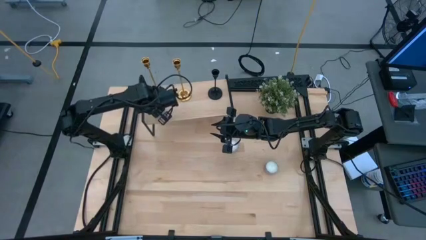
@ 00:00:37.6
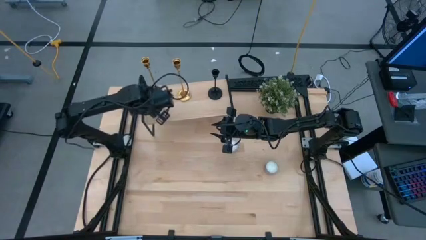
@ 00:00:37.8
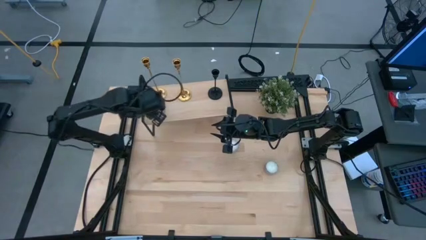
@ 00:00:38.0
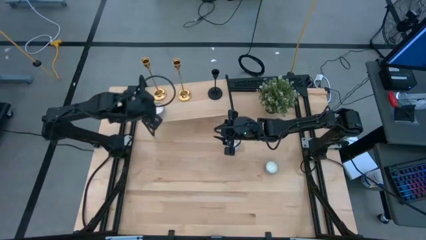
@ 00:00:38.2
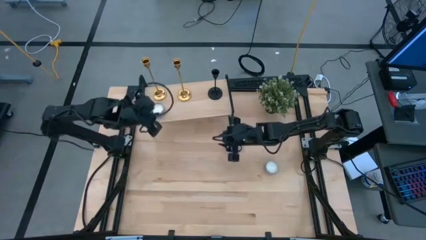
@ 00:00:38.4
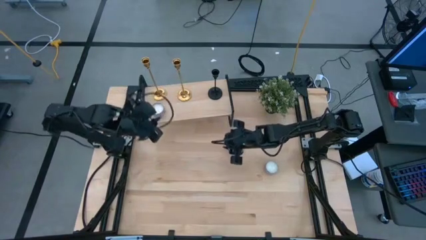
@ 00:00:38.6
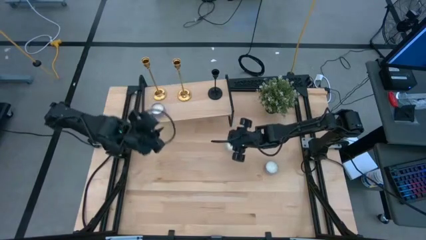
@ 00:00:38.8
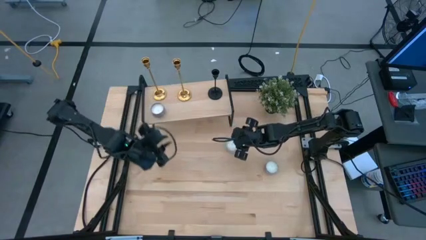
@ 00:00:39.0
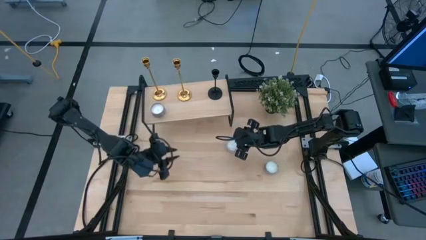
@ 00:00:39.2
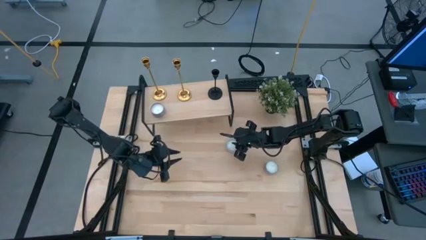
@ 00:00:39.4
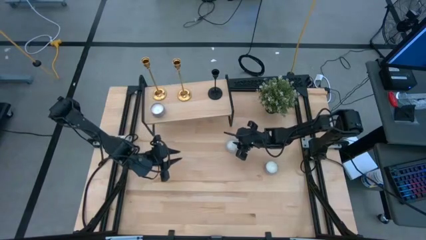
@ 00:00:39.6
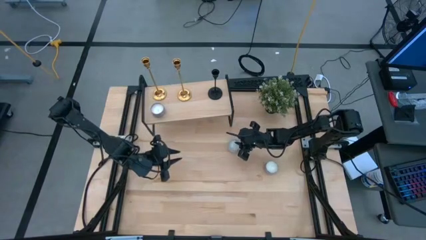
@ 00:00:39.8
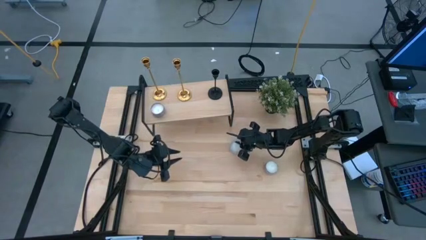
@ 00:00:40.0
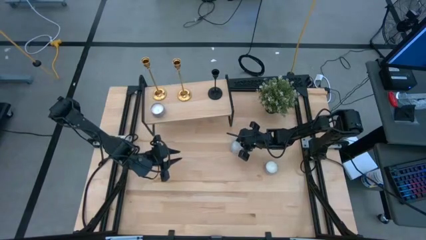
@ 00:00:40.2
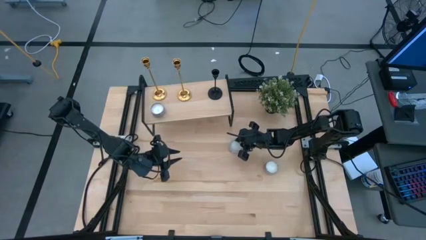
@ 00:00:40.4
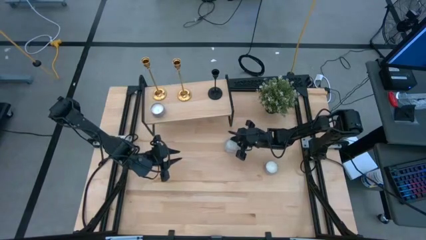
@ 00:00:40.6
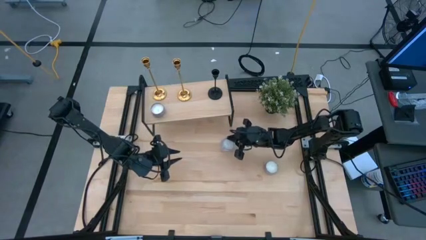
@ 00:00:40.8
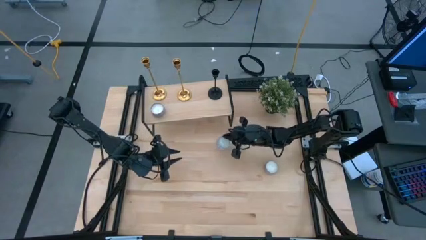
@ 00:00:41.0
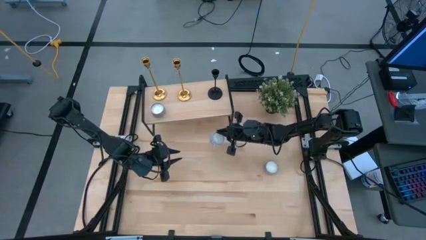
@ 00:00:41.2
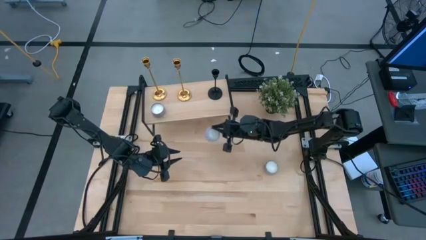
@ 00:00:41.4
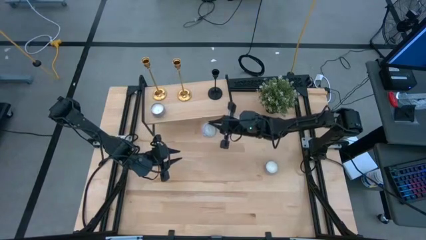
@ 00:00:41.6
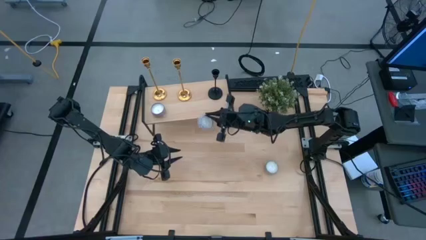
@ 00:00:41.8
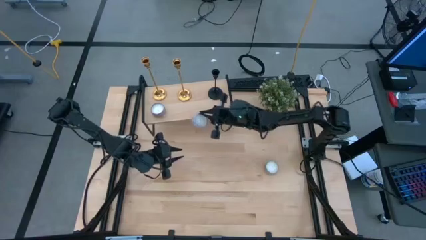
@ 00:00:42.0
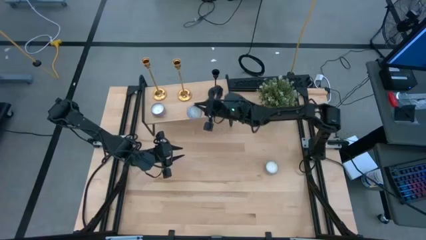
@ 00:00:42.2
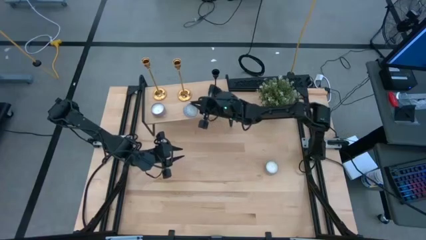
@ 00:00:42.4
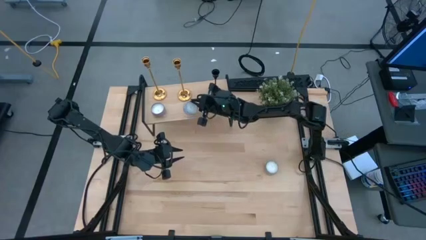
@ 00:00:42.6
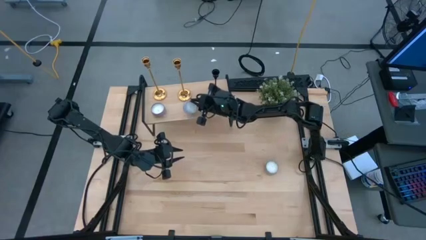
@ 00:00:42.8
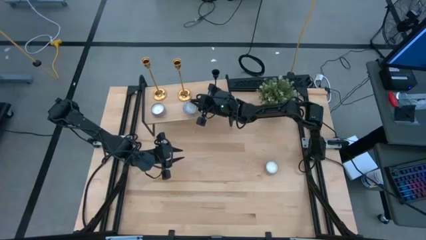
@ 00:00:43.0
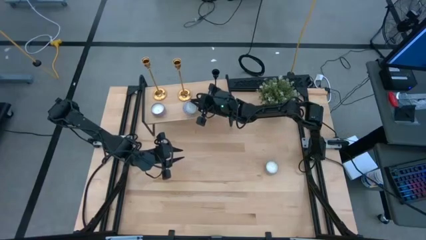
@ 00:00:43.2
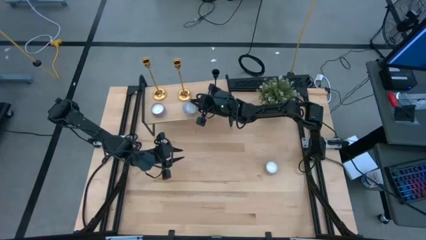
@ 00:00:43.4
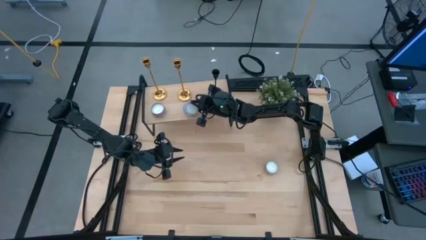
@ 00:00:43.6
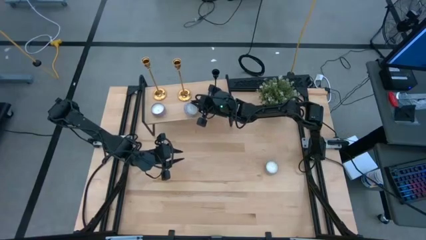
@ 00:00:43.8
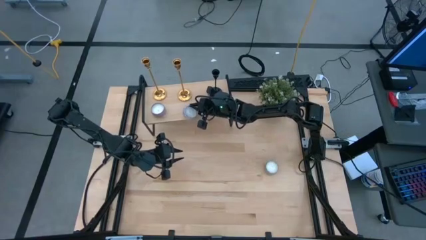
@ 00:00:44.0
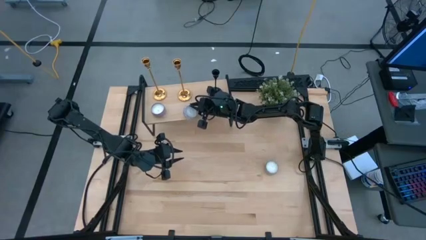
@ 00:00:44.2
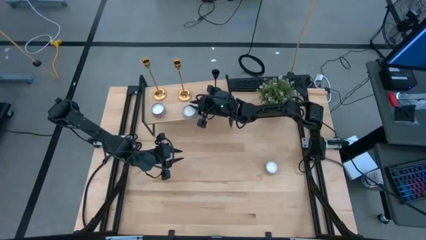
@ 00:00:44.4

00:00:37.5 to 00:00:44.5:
Task: Pick & Place candle stick holders
Put the blue and white scented candle on the shelf

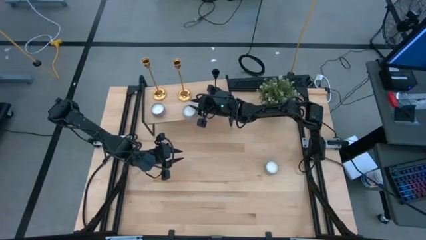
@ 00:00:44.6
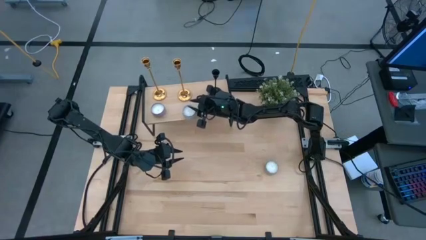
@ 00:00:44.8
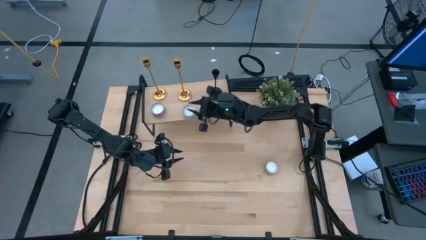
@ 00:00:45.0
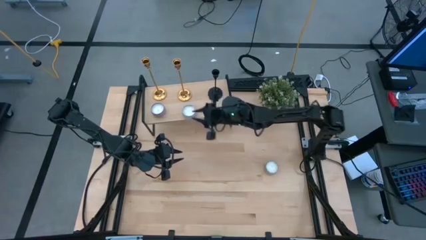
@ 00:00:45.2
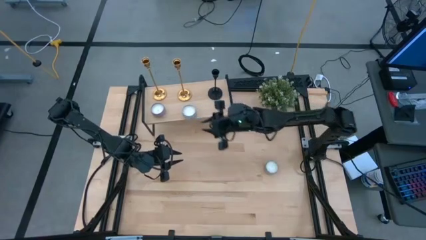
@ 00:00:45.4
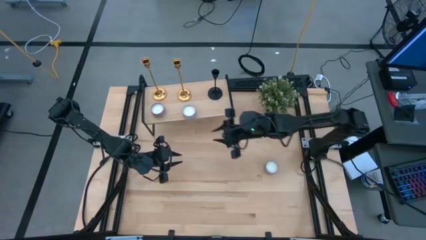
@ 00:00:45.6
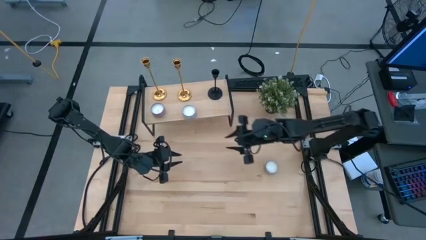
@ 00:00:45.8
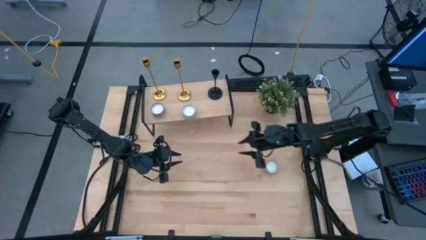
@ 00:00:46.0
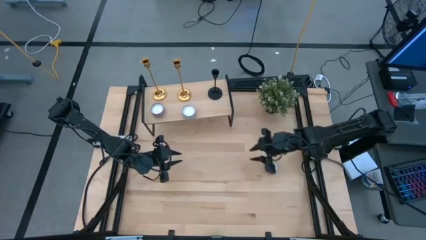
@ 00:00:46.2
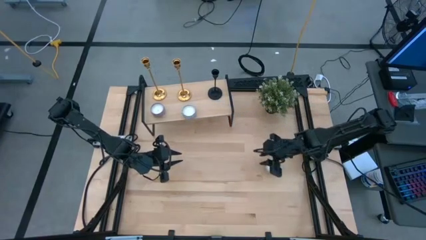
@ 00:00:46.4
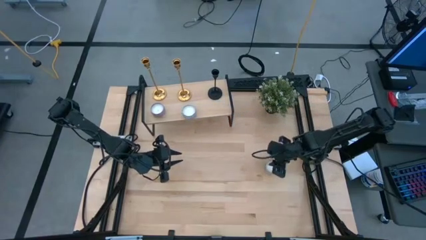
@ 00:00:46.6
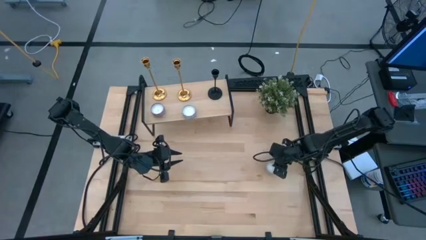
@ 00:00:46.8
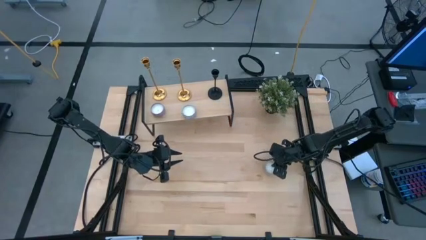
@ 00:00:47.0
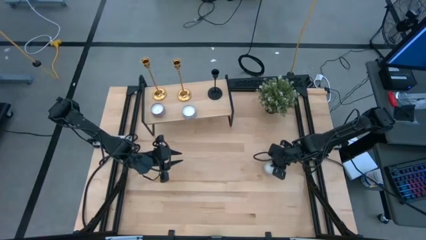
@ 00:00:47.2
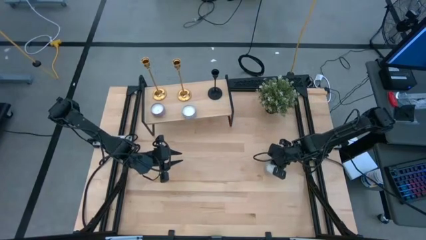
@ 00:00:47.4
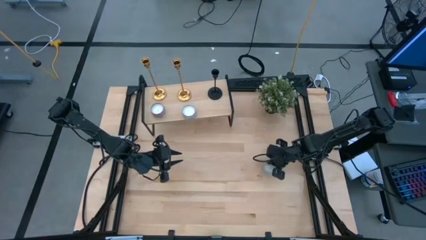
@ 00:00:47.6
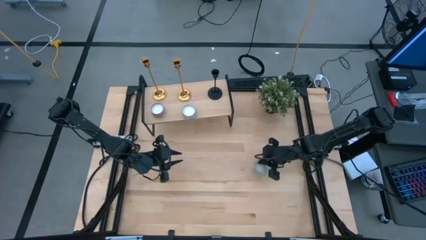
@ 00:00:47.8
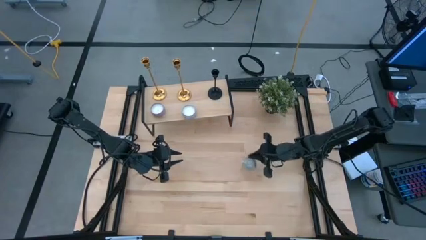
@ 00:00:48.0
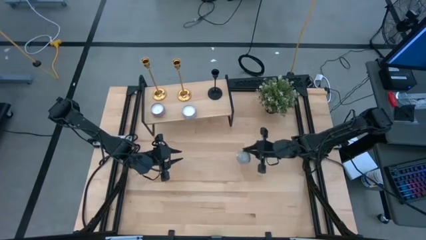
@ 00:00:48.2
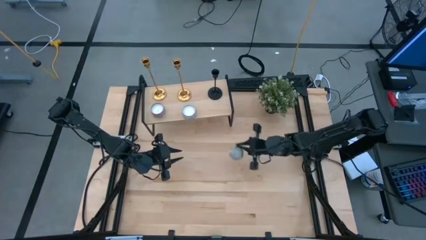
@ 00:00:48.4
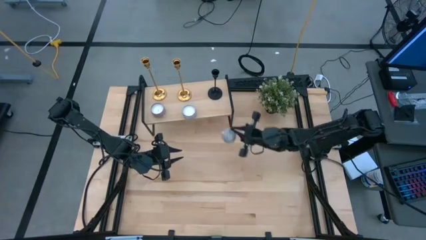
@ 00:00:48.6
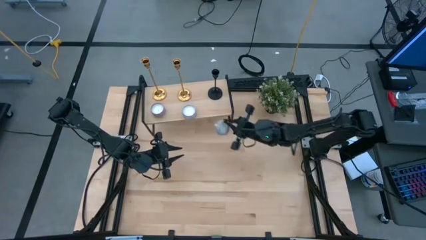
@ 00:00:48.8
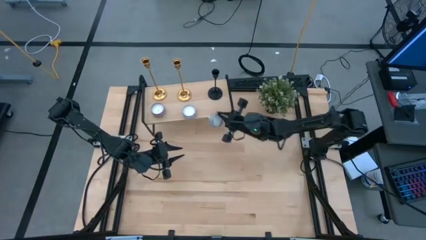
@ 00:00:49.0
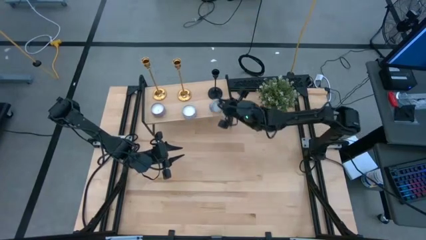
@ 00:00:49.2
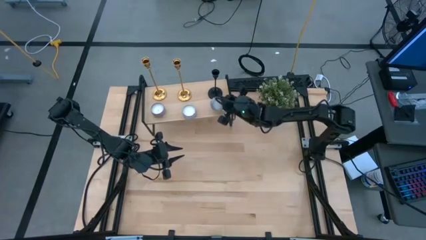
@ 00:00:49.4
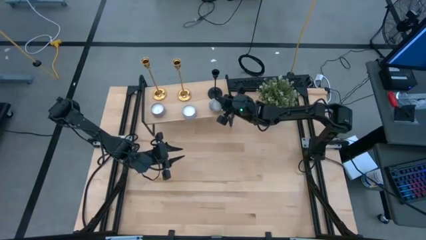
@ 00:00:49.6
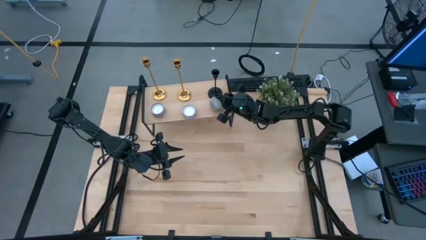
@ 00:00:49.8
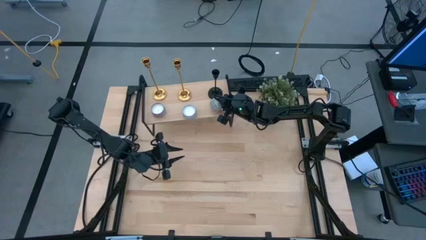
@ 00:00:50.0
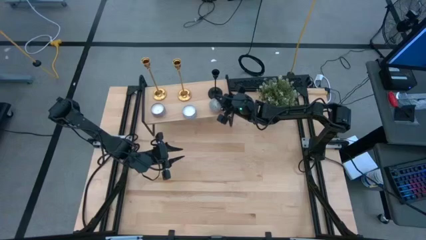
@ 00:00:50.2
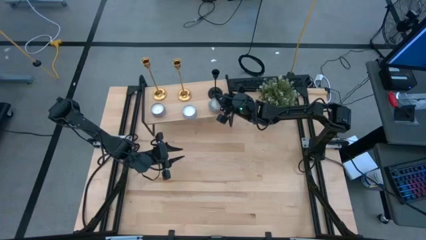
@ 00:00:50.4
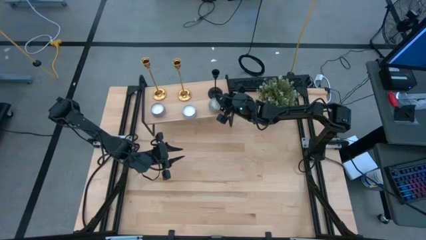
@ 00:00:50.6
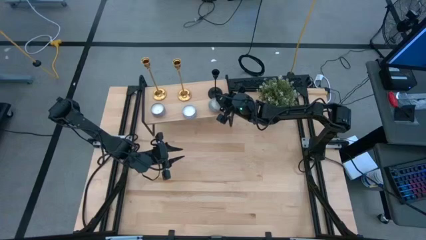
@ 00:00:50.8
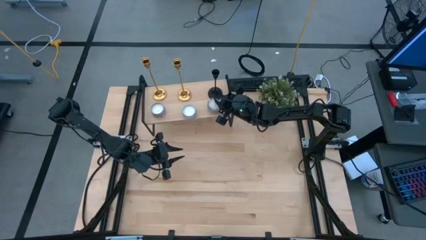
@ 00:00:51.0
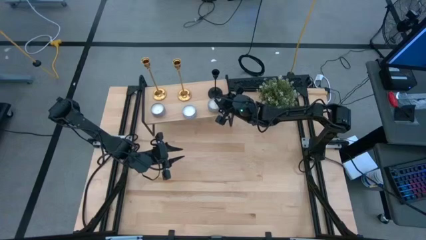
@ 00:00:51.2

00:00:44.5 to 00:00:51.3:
Put the yellow and blue scented candle on the shelf

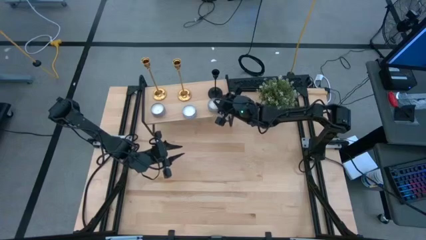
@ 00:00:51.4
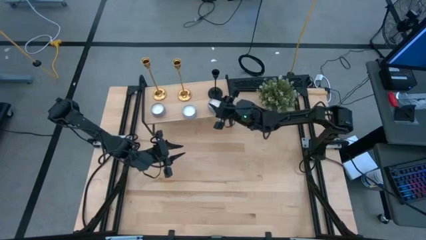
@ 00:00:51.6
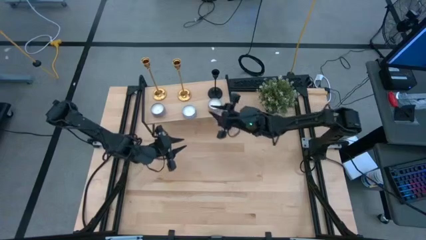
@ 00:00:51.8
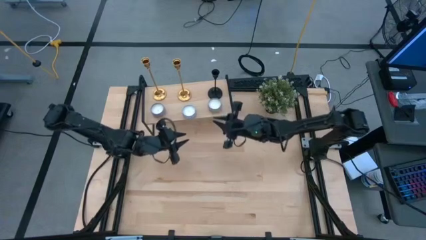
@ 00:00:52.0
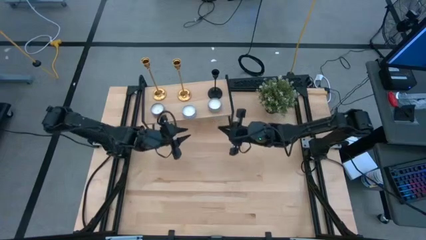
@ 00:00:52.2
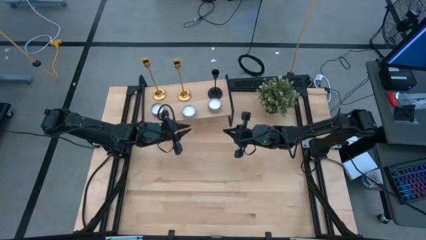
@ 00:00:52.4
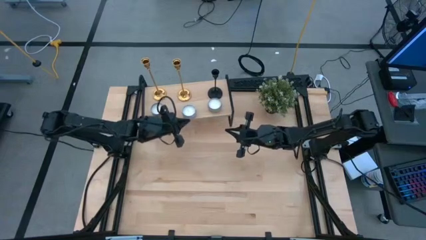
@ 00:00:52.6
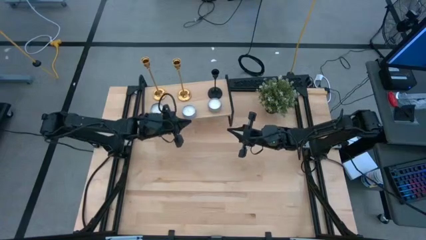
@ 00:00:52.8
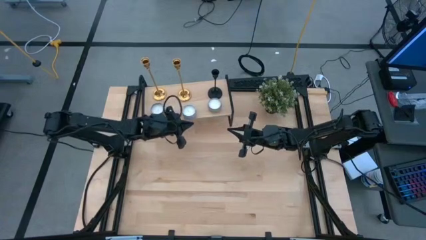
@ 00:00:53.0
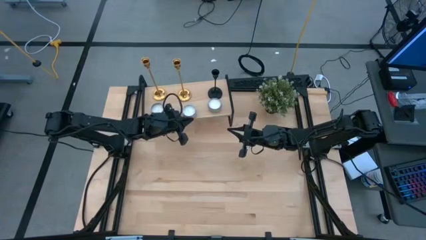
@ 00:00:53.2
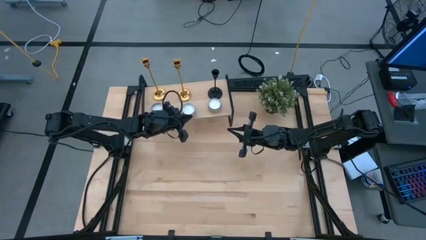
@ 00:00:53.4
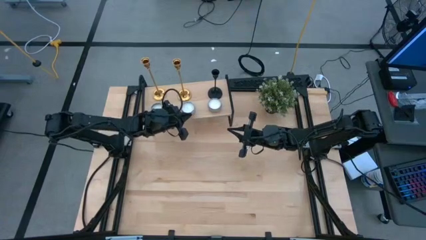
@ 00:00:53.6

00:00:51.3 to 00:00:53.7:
Adjust the blue and white scented candle on the shelf
